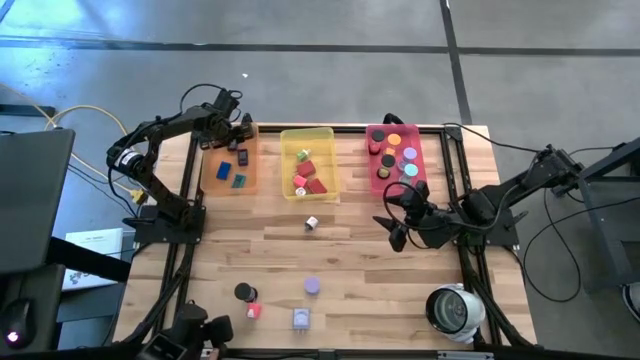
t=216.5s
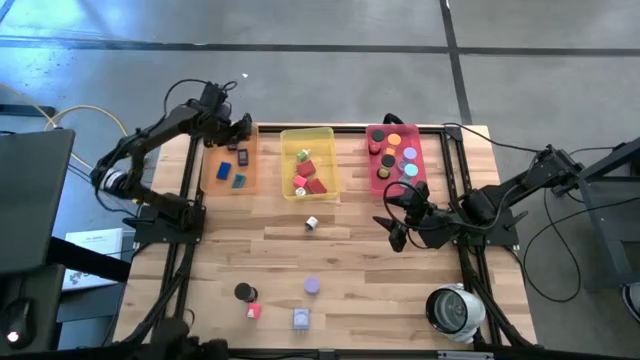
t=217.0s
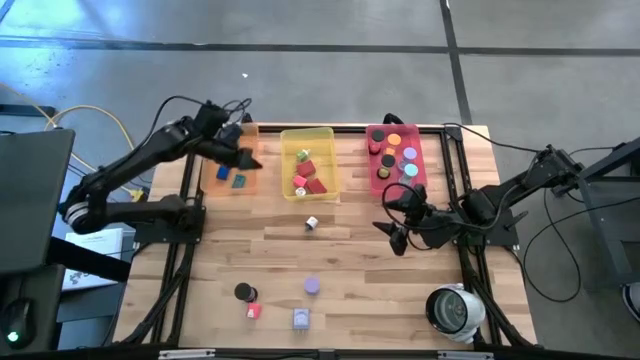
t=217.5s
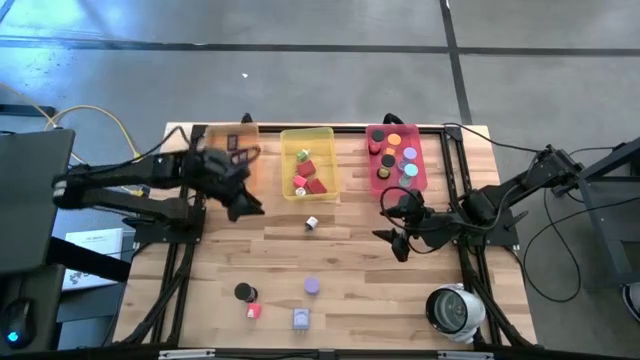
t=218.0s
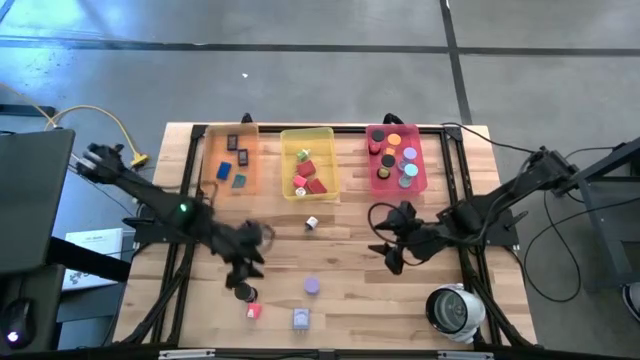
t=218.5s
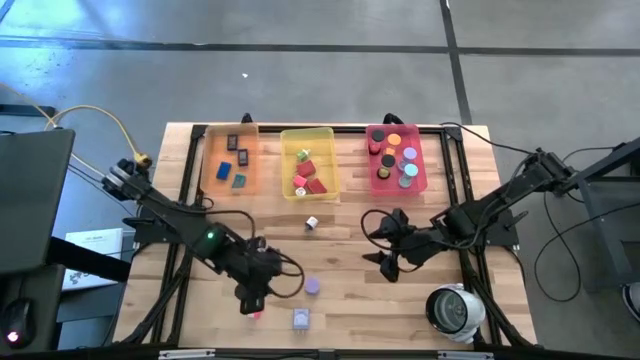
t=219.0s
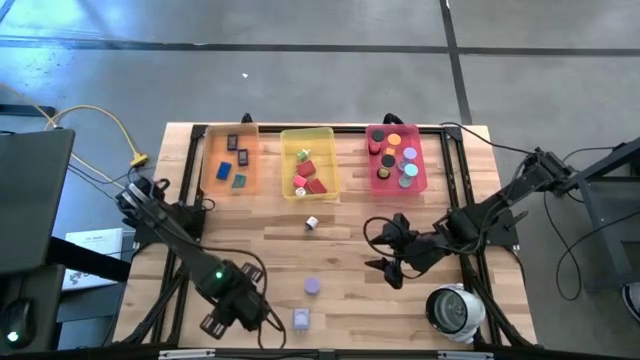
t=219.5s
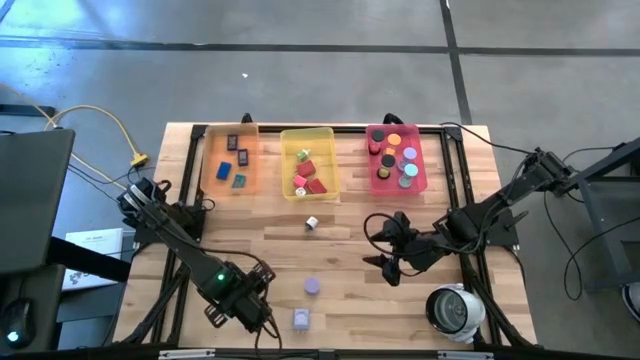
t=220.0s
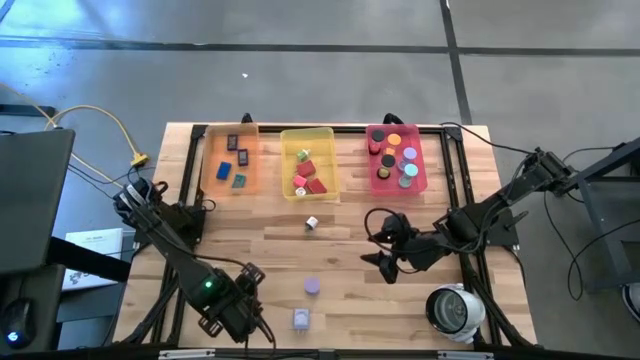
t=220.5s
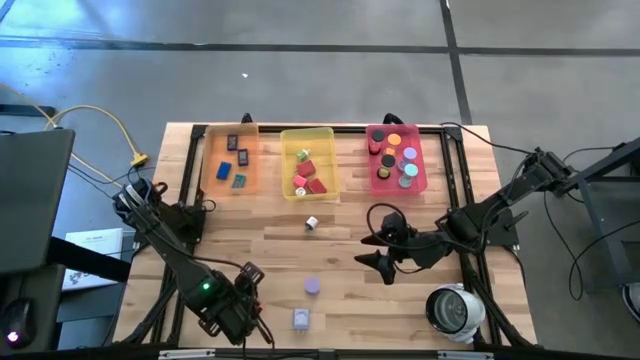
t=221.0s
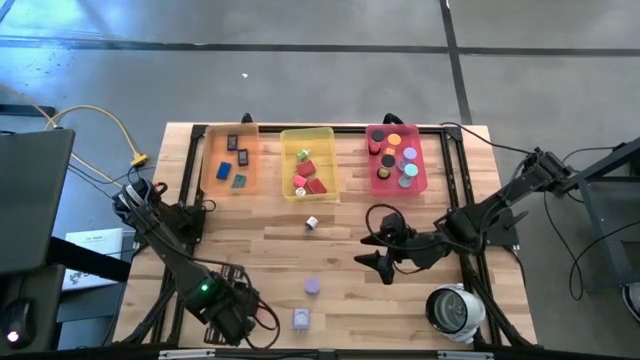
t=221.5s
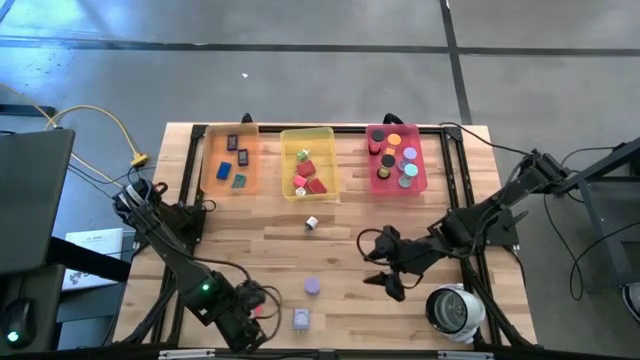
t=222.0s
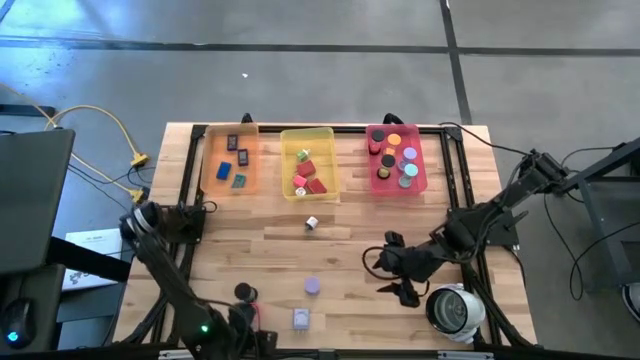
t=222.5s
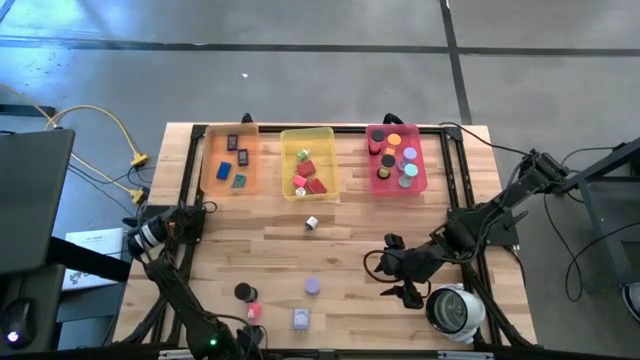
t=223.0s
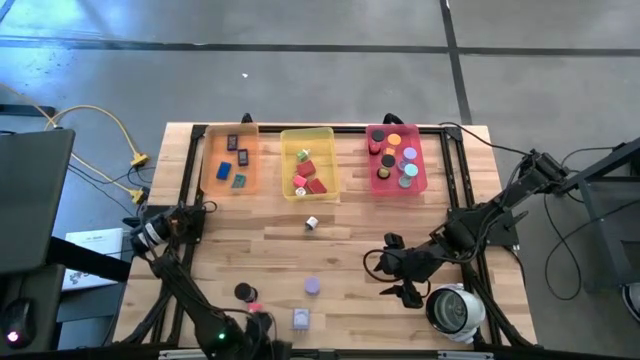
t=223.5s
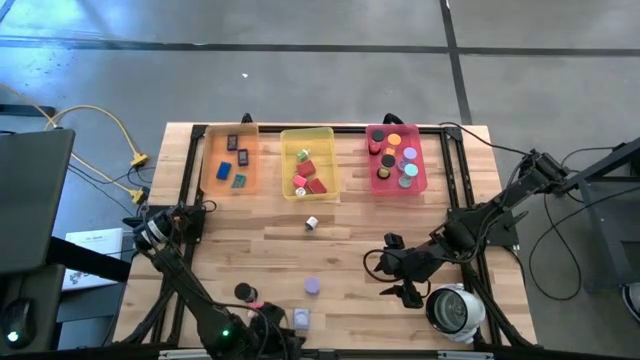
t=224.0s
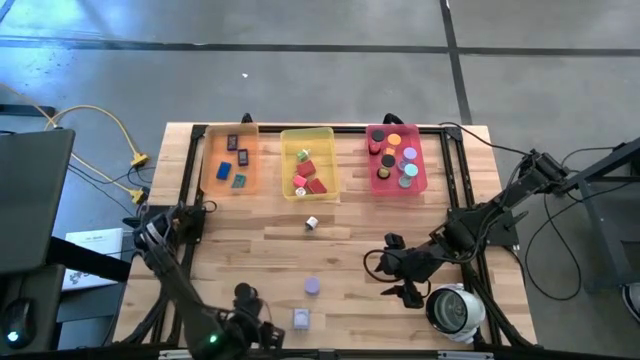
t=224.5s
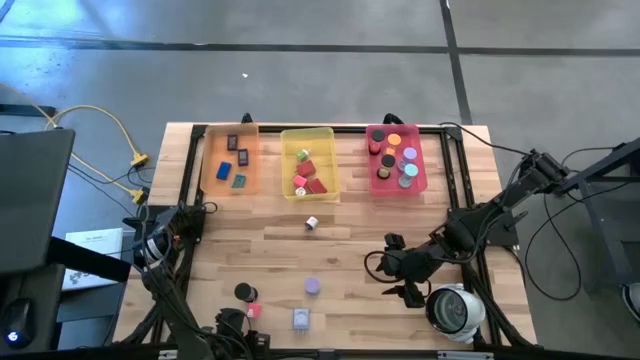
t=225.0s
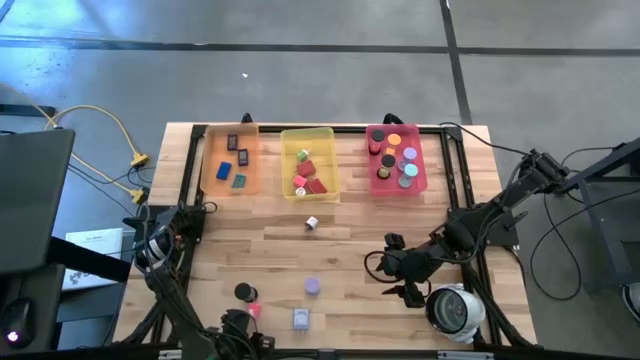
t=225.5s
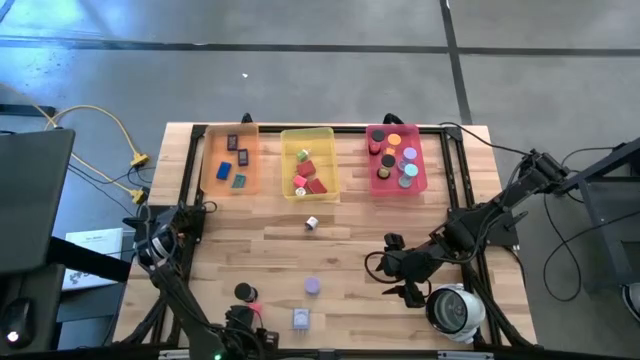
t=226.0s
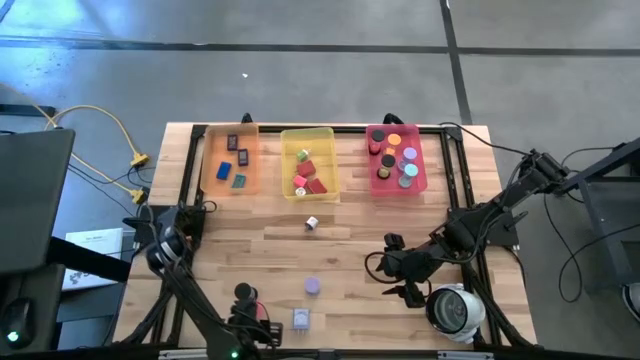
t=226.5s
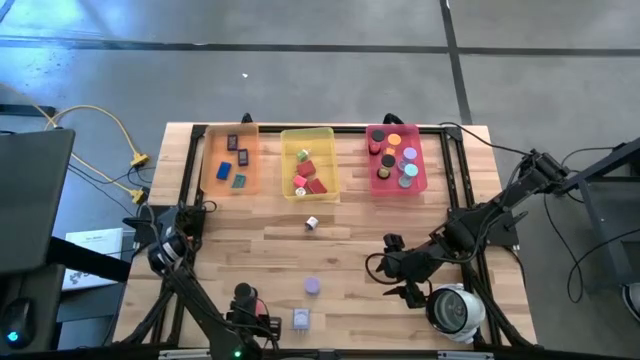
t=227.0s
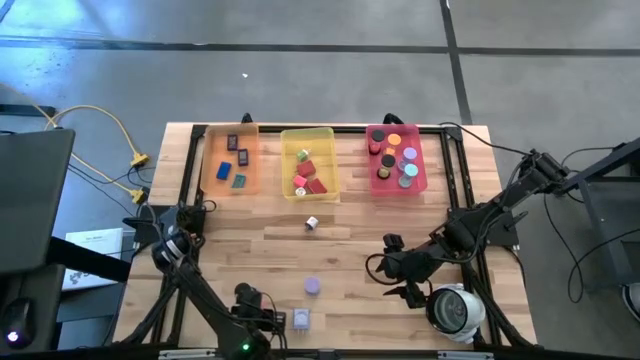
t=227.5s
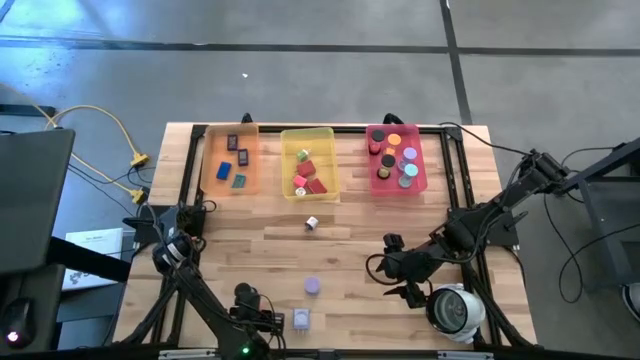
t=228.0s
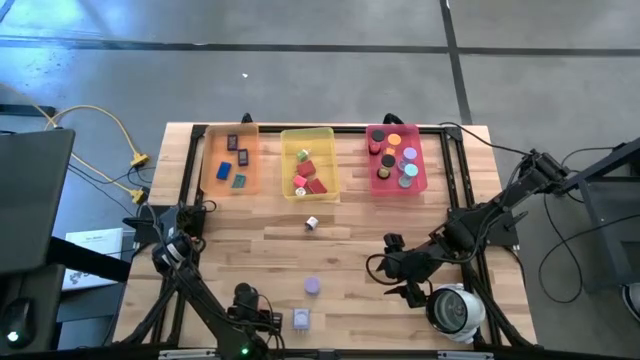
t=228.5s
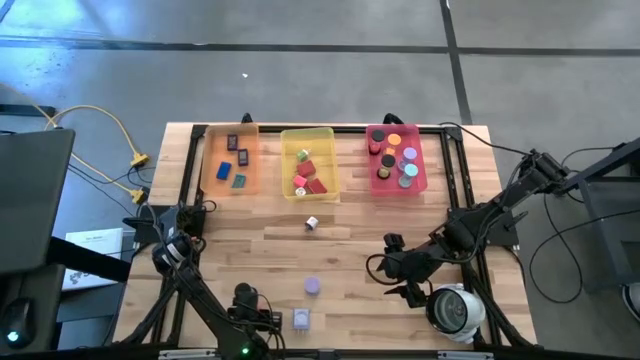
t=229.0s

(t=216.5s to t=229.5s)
Task: Pick & Place Office items
Put the pink charger adapter into the yellow bin
